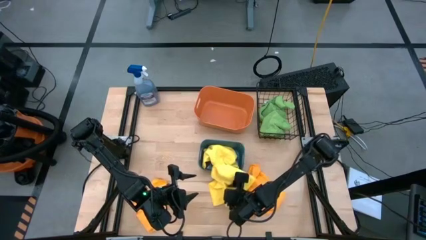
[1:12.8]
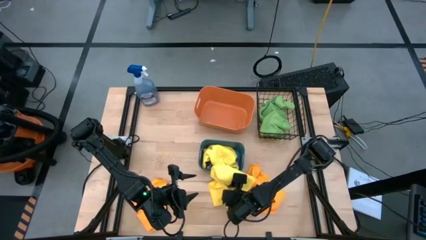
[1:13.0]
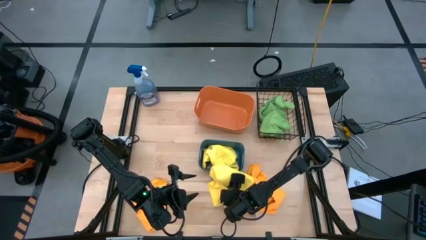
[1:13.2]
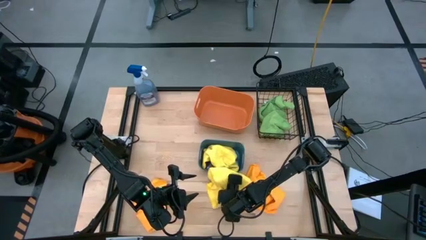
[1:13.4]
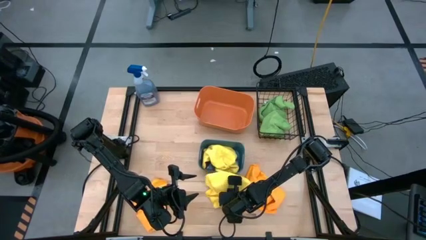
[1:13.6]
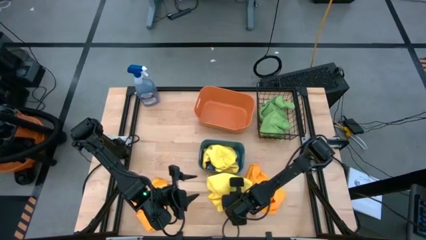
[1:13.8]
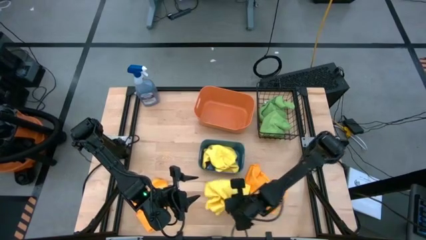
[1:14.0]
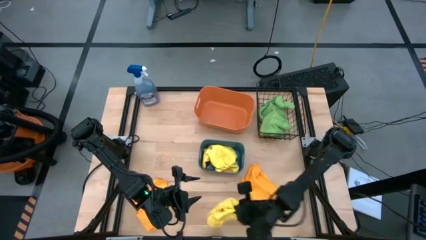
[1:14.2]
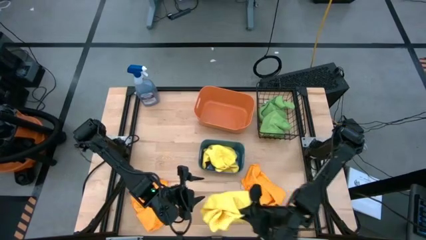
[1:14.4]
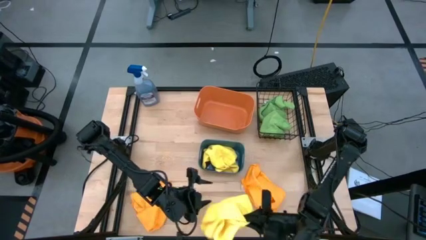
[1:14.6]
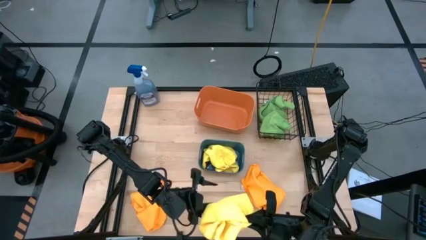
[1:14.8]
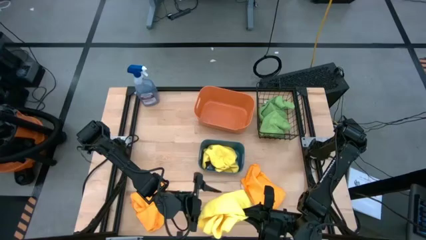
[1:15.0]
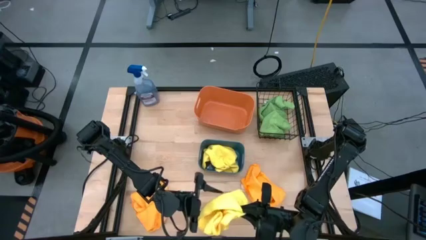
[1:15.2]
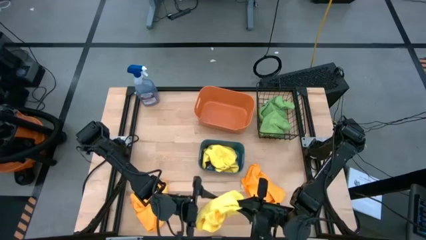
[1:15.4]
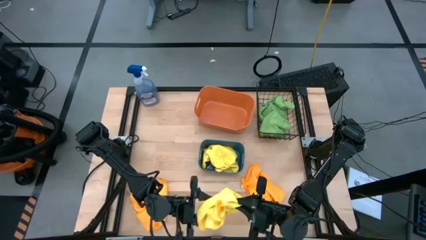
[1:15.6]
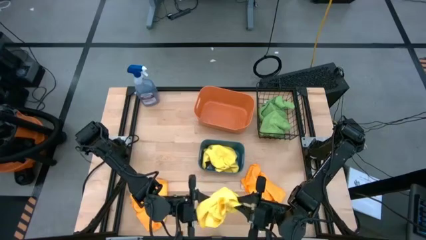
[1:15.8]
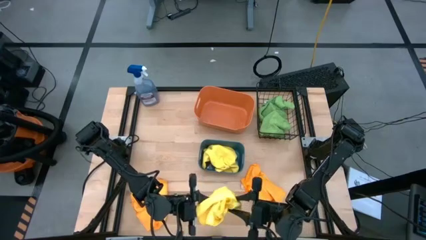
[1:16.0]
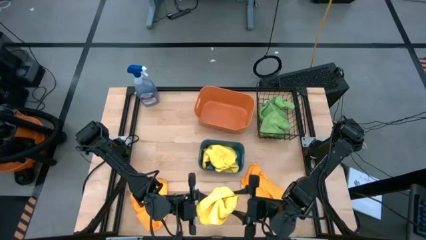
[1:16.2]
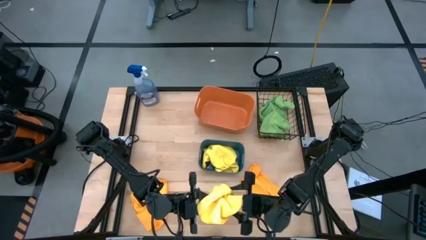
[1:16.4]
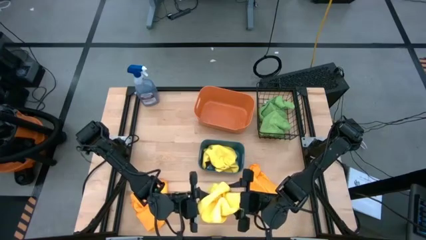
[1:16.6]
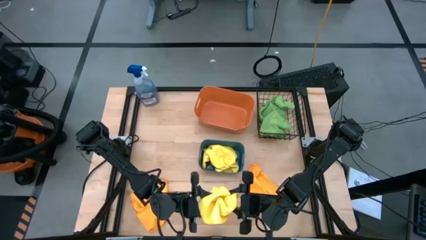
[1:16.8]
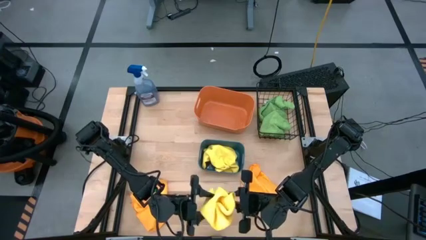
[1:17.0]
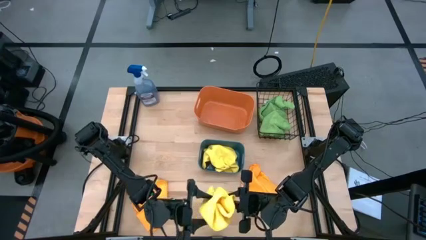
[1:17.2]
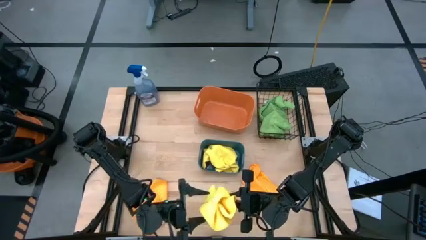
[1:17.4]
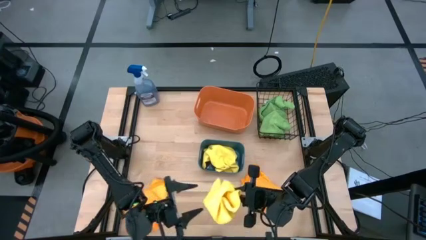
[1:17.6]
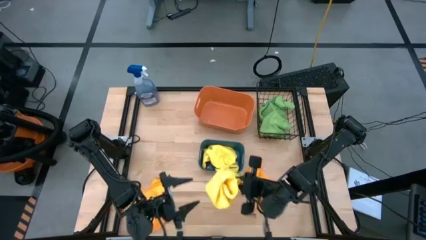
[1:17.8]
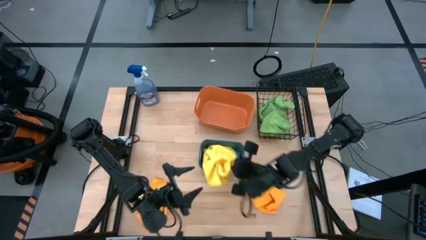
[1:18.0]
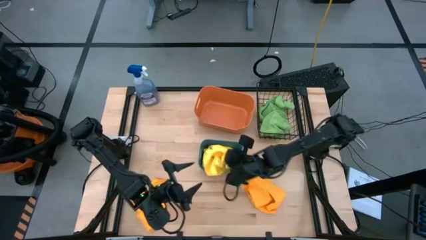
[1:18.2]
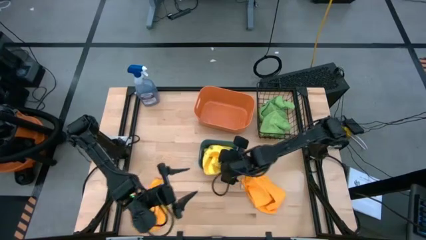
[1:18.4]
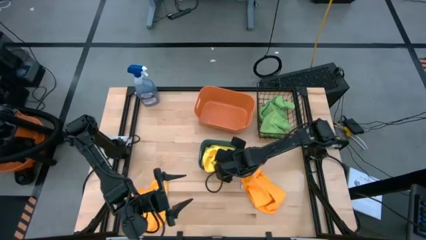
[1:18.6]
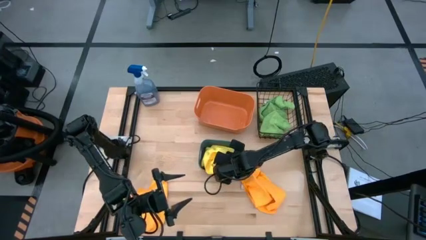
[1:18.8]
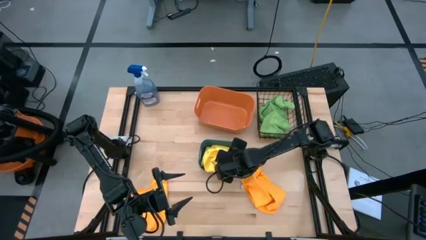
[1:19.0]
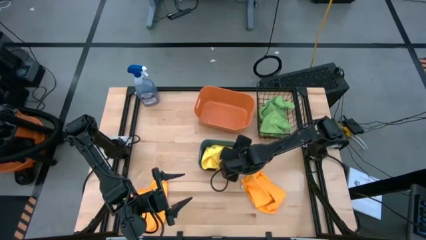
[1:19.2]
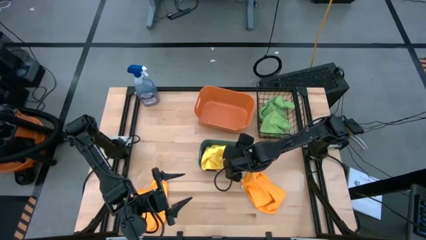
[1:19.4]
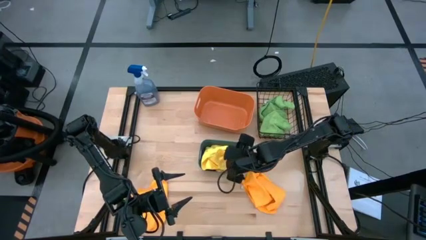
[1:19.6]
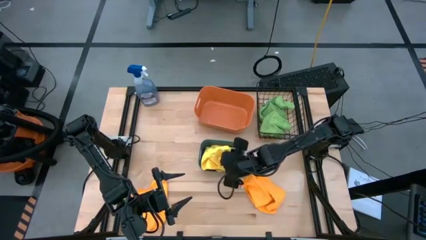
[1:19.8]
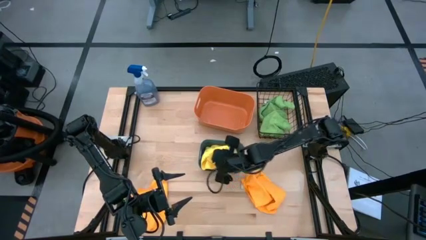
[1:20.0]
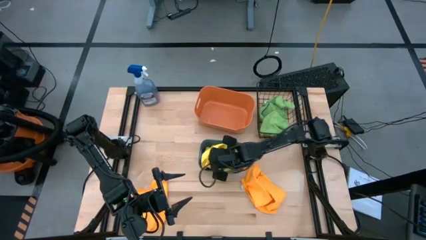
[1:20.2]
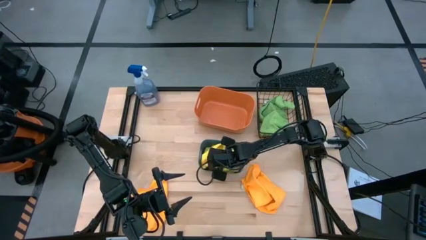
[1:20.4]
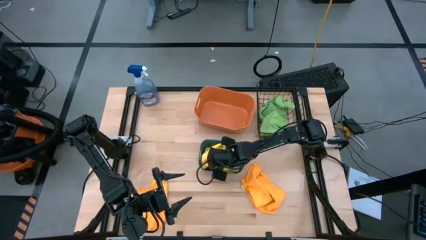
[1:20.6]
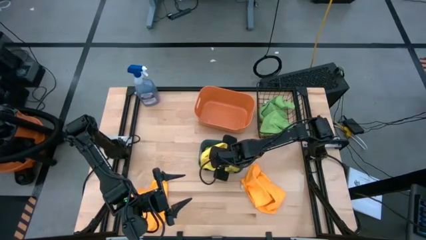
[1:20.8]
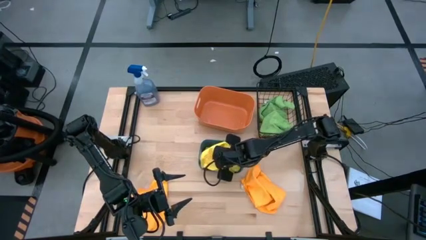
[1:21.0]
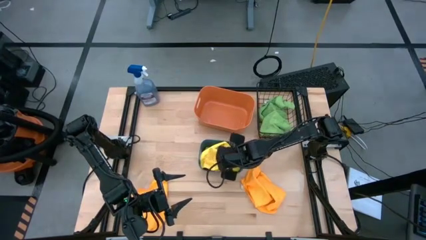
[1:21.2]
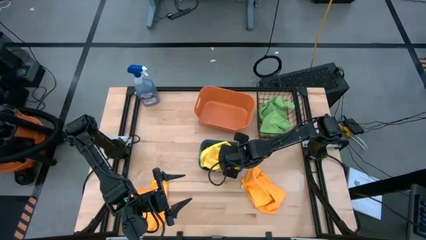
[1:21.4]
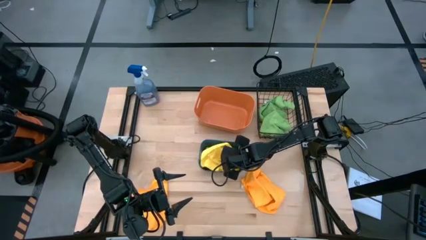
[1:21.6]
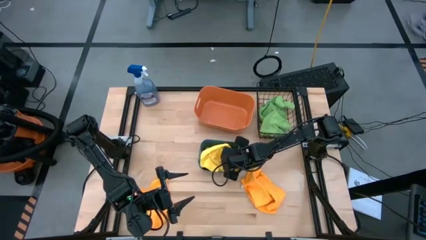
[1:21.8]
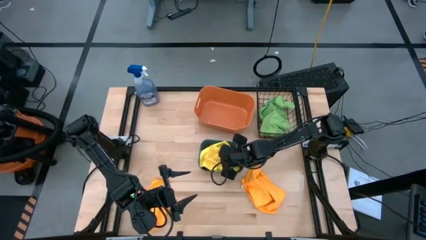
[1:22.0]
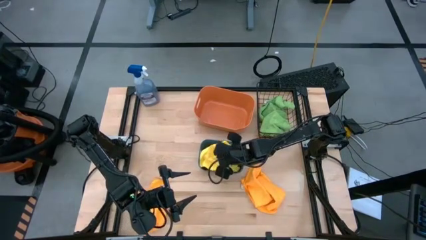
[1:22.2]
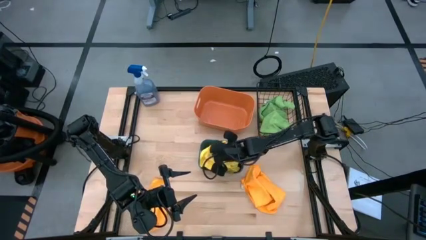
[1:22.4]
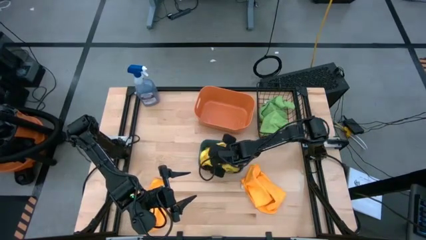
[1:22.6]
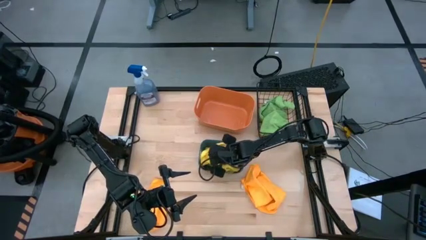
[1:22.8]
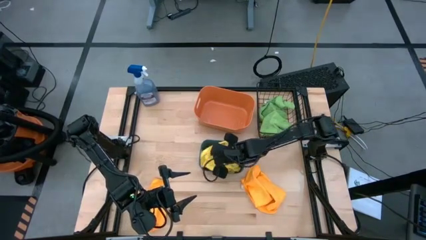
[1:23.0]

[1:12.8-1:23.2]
Task: Sort microfiber towel by color & place in baskets
Put the yellow microfiber towel into the blue bin

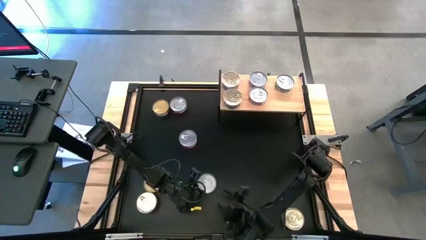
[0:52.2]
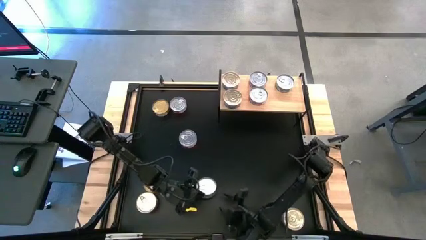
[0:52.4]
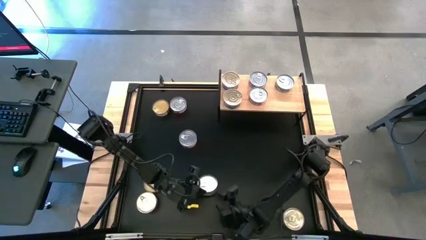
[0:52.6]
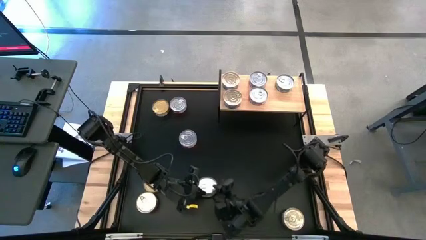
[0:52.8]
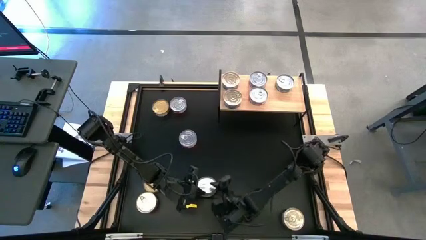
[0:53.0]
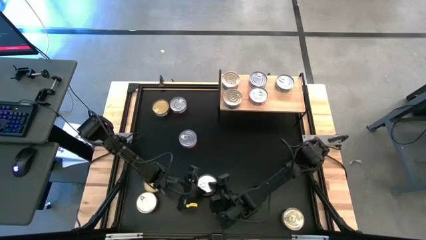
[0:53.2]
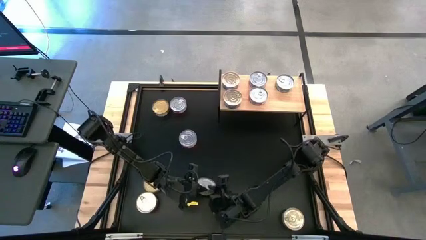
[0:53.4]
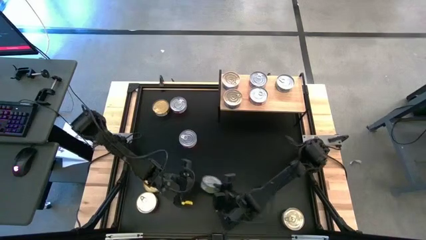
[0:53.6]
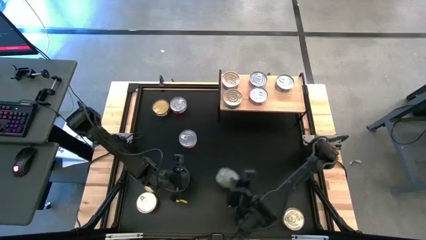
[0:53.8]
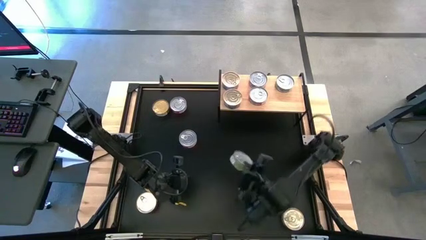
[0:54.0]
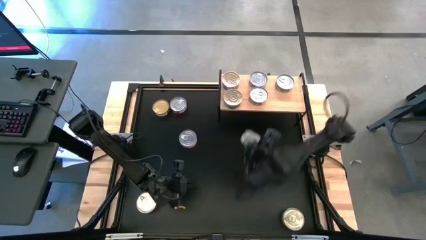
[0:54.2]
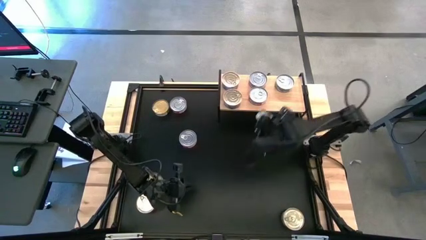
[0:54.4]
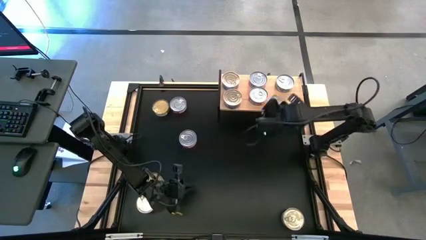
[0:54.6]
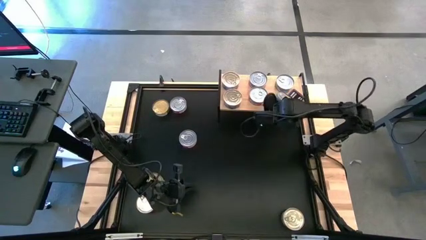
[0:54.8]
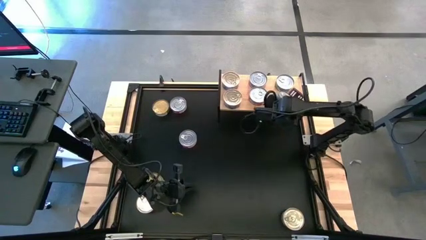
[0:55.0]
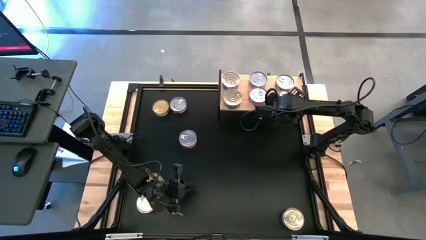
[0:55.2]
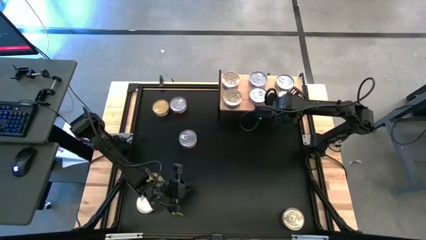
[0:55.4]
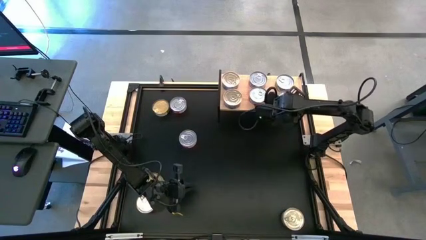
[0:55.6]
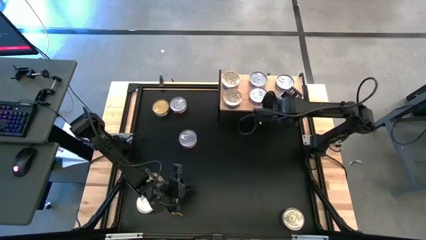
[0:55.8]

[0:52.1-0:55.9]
Task: Stack canned seafood by type on shelf
Put the green tuna can on the shelf aligned with other green tuna can
